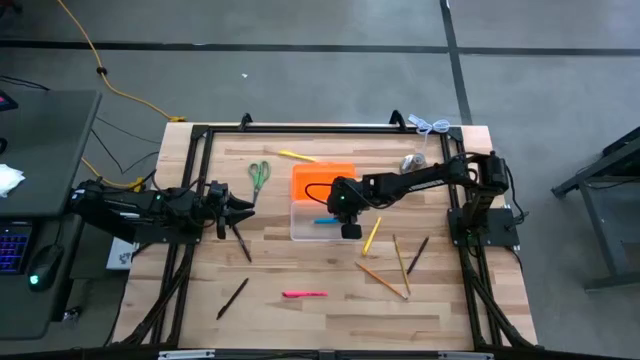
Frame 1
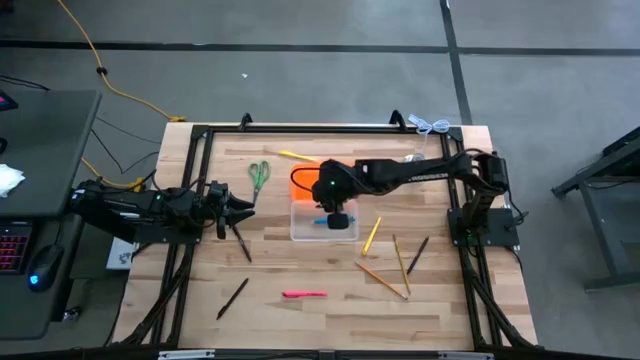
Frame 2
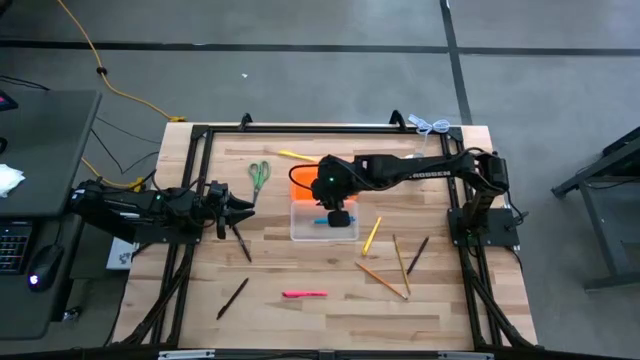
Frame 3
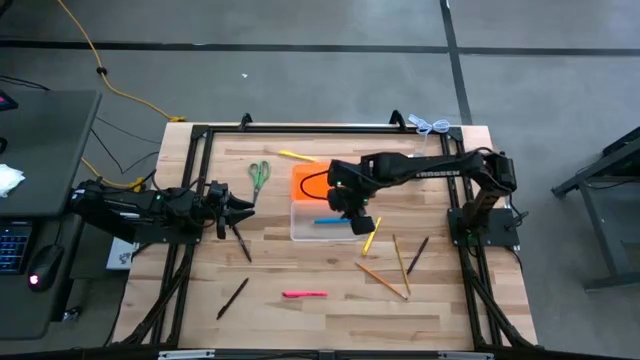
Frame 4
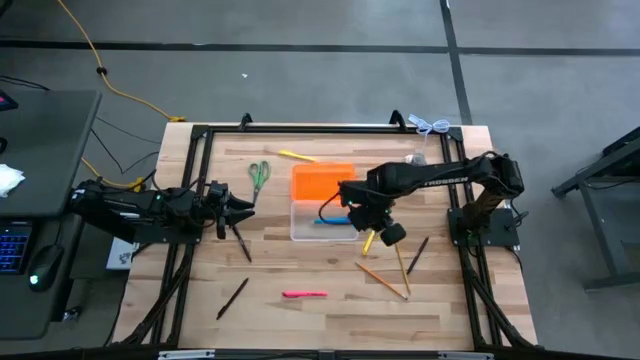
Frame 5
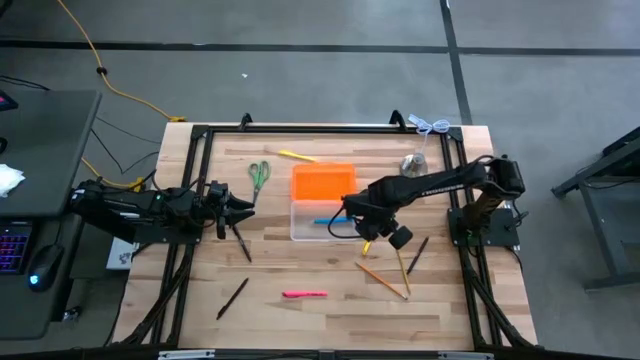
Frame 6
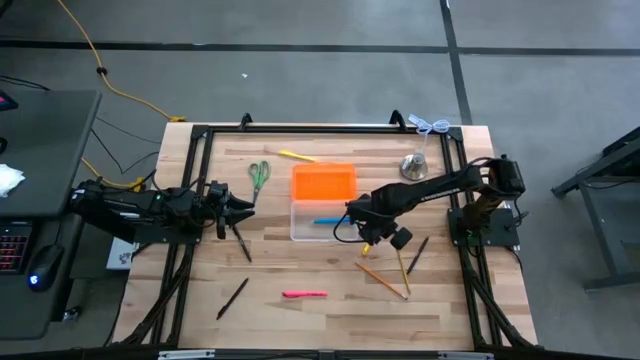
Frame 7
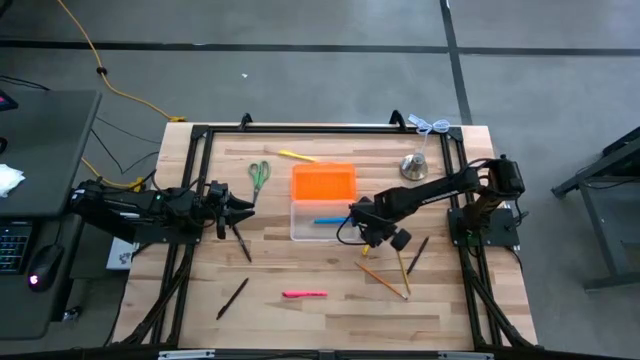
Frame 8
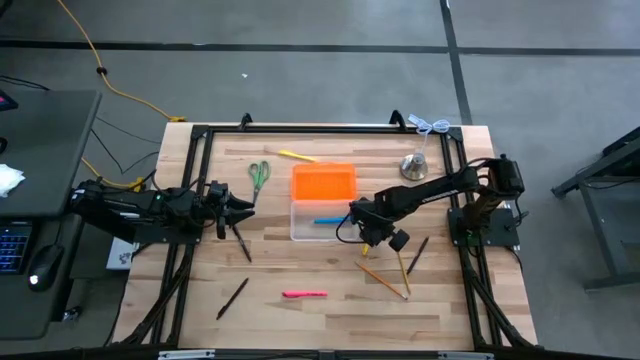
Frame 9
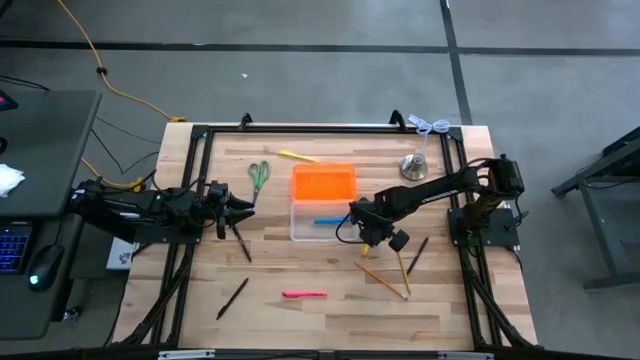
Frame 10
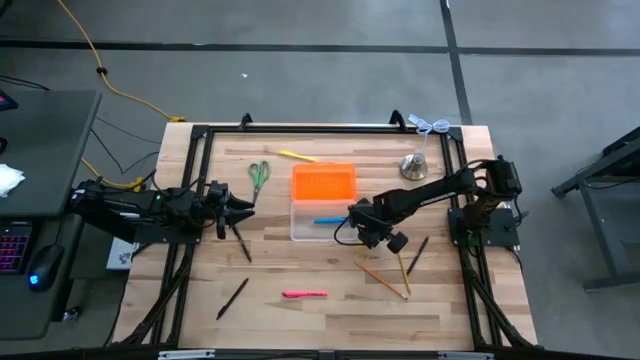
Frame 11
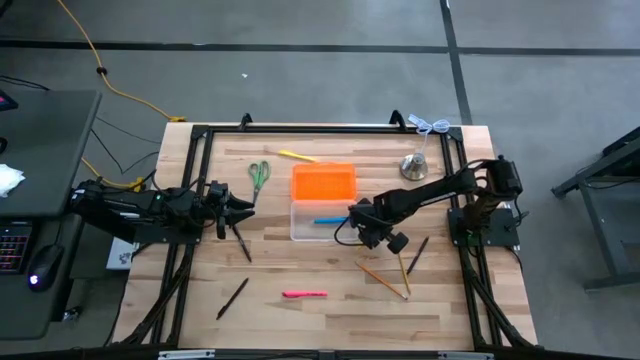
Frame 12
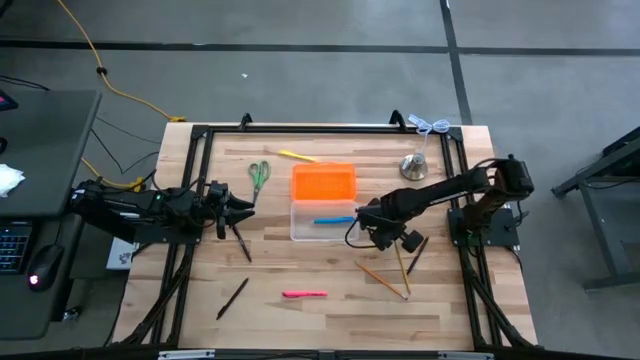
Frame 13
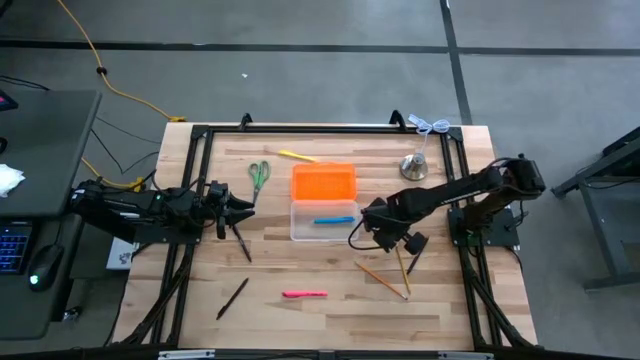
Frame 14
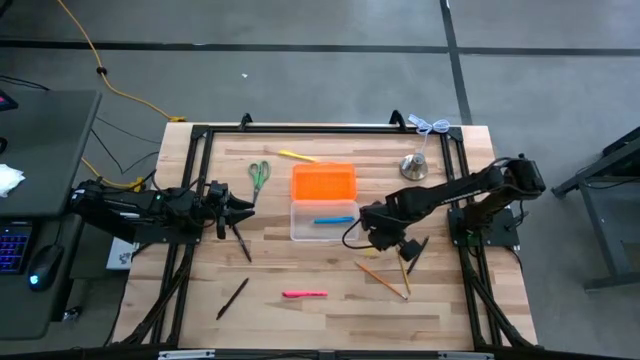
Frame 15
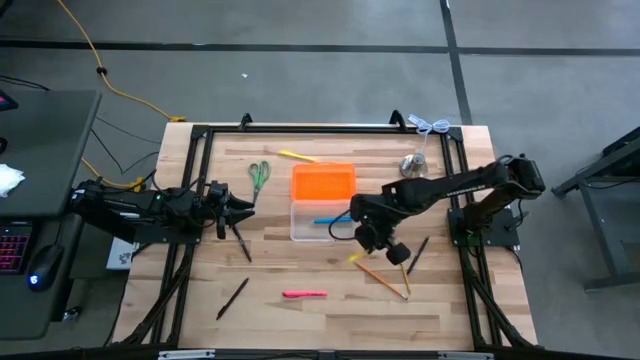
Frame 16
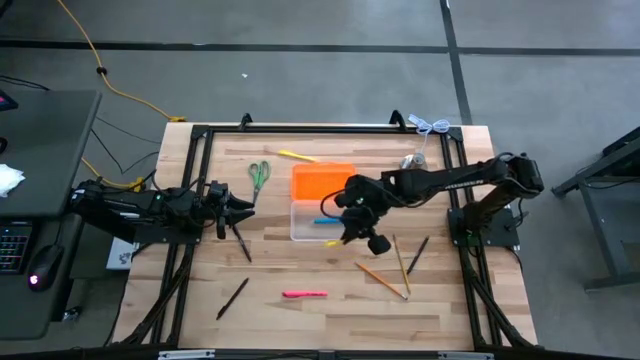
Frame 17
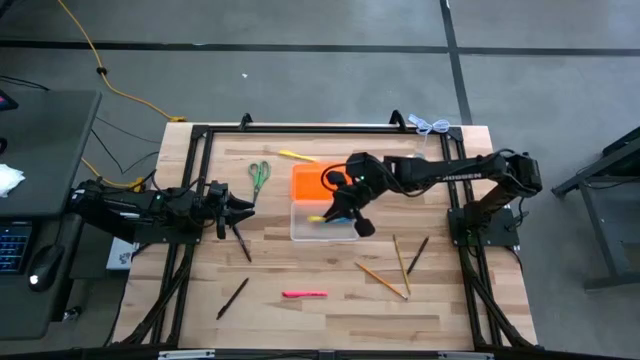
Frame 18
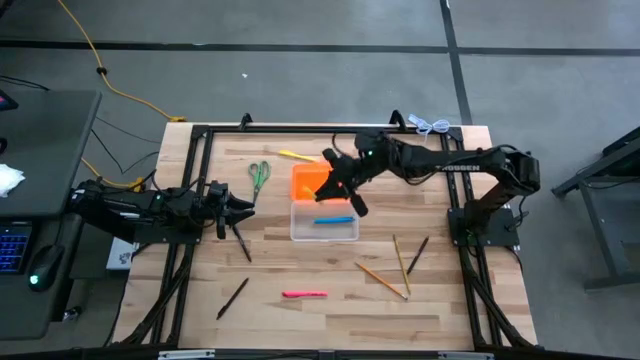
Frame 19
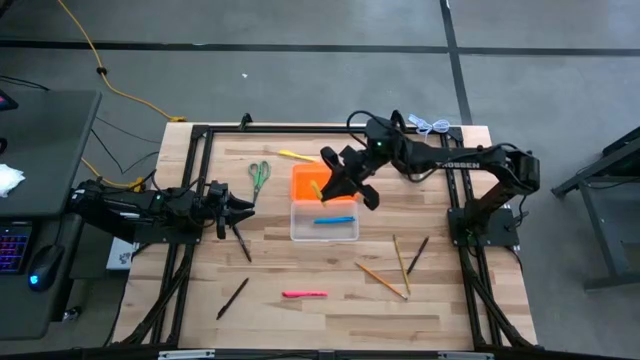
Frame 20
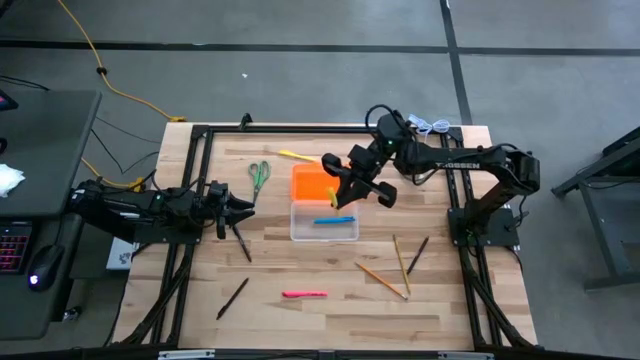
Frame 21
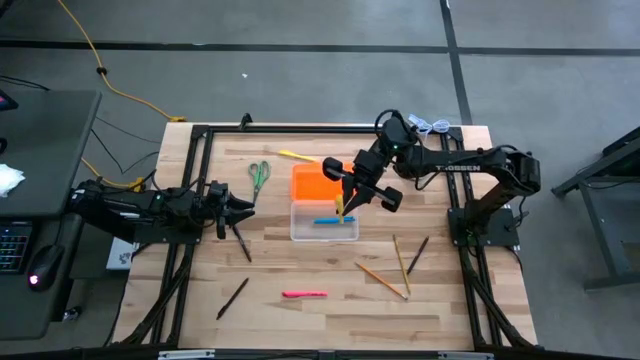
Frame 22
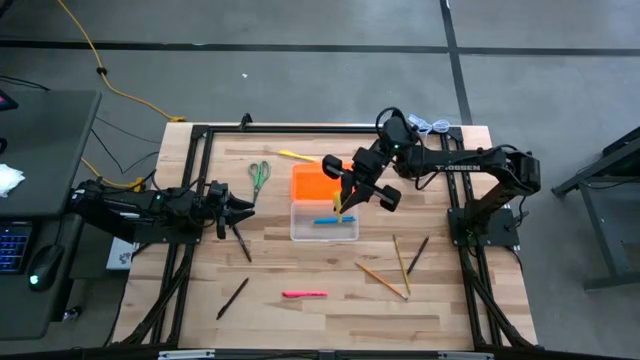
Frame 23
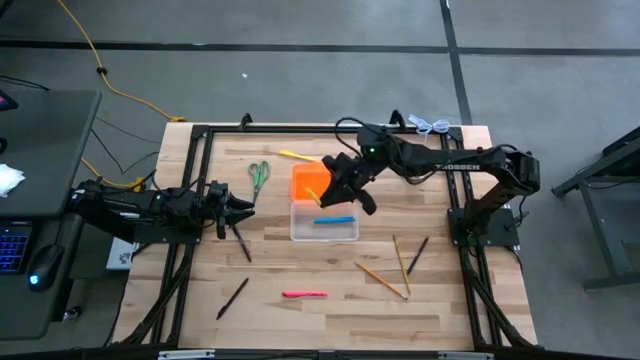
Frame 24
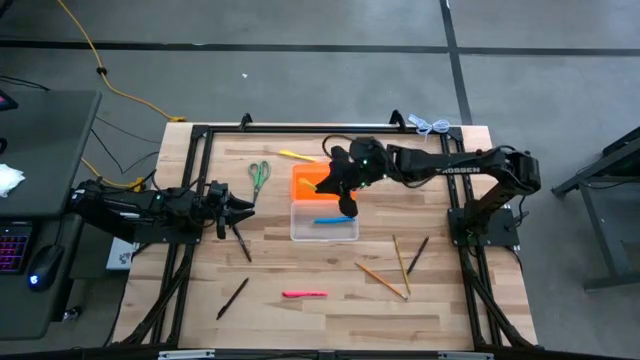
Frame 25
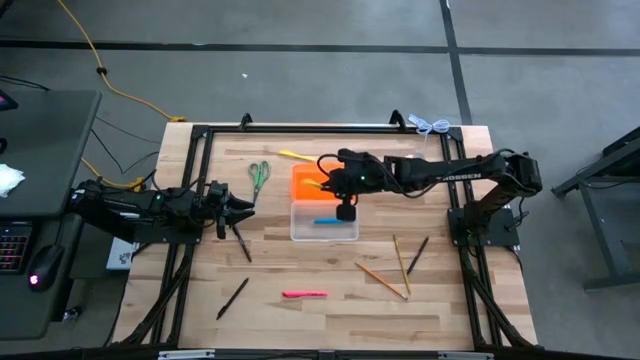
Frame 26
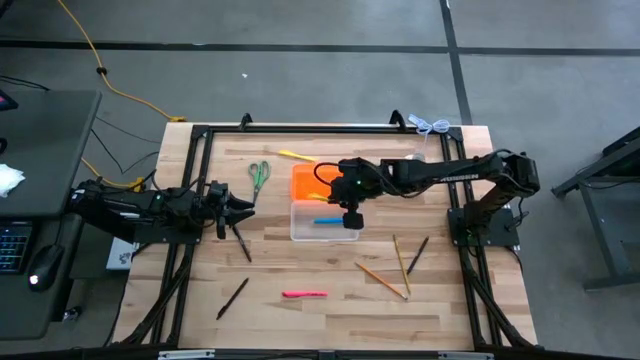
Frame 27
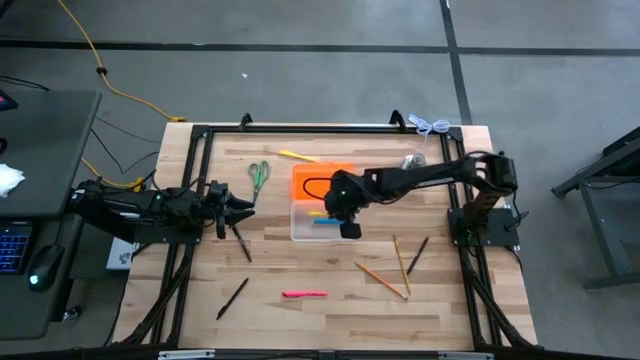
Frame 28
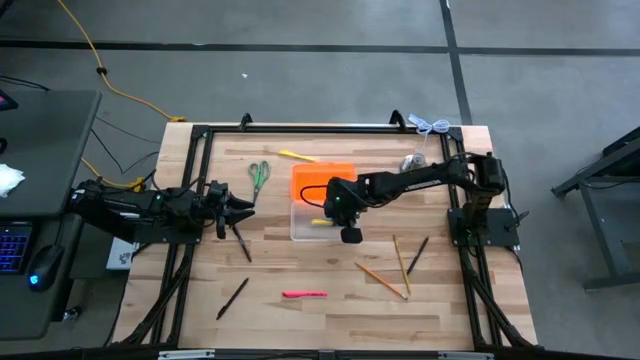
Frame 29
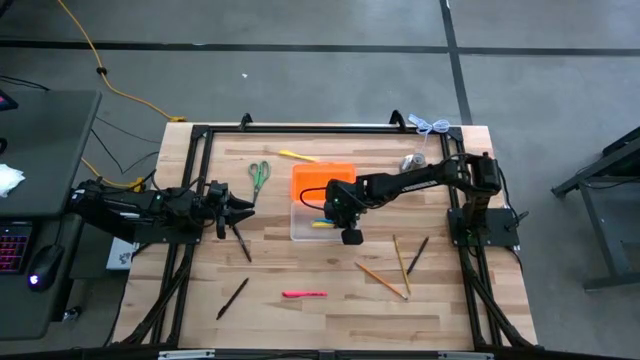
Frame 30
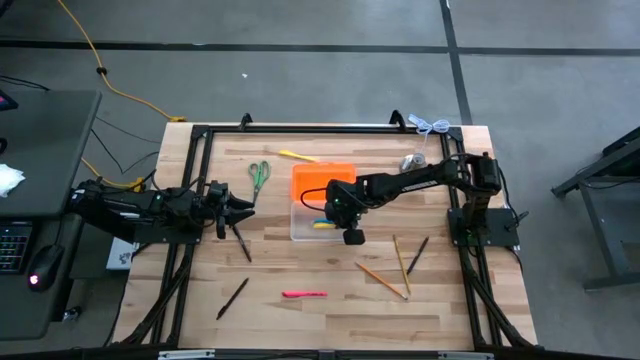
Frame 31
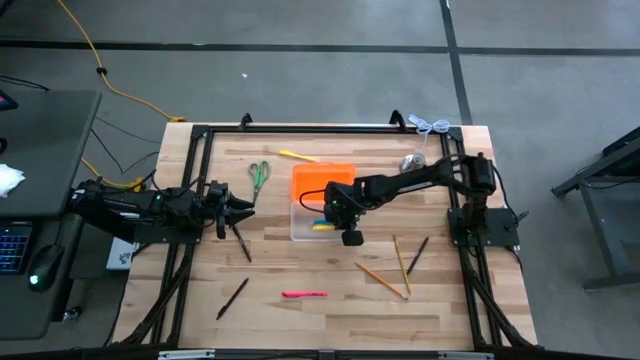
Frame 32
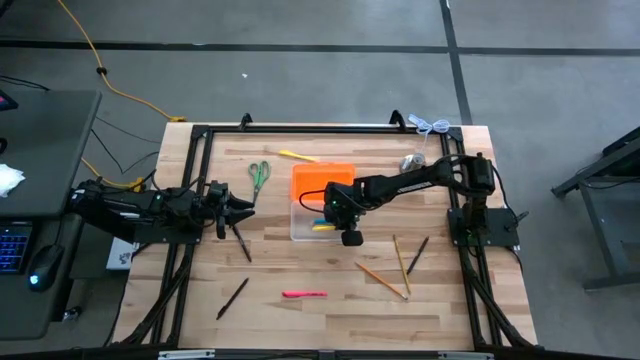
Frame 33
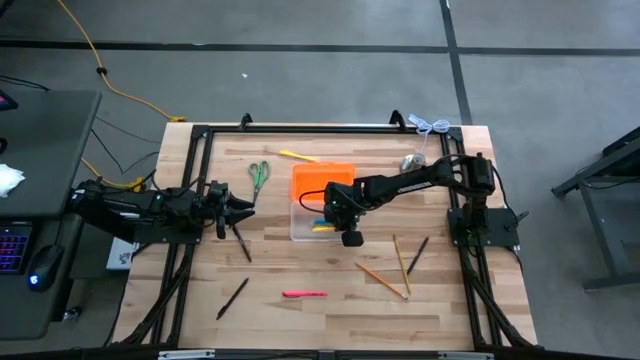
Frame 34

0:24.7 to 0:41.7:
Task: Pick & place school supplies into a supply box
Put the bottom yellow pen into the orange supply box

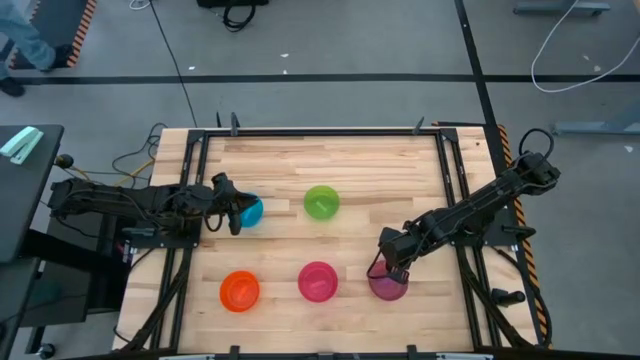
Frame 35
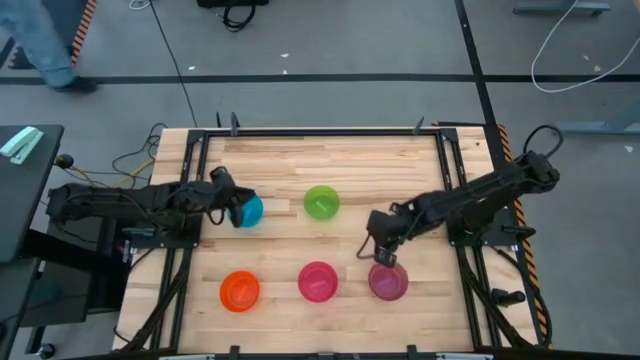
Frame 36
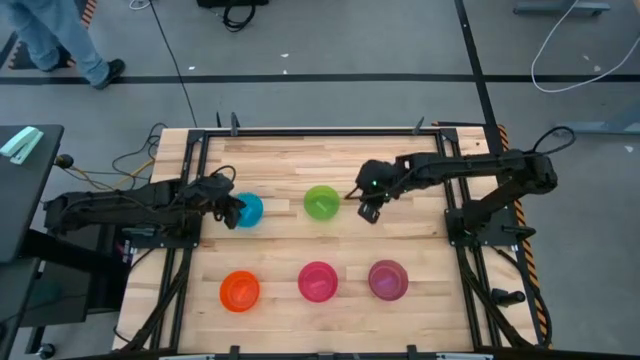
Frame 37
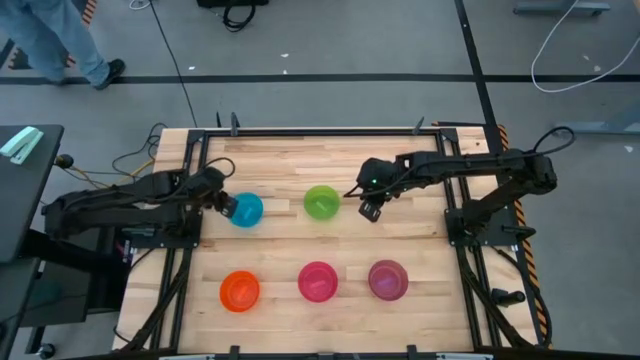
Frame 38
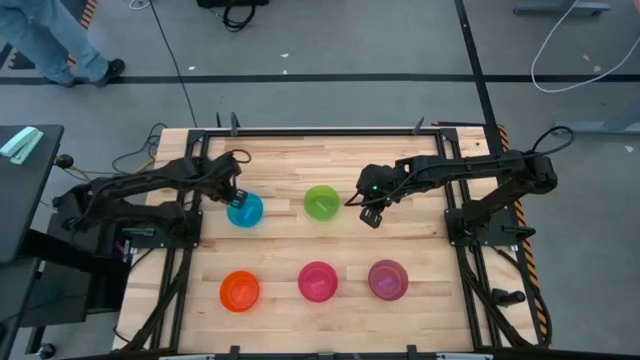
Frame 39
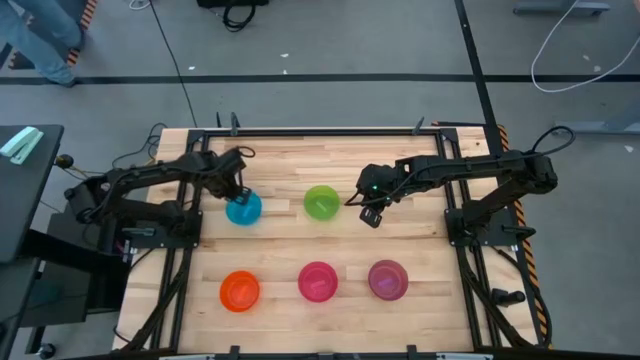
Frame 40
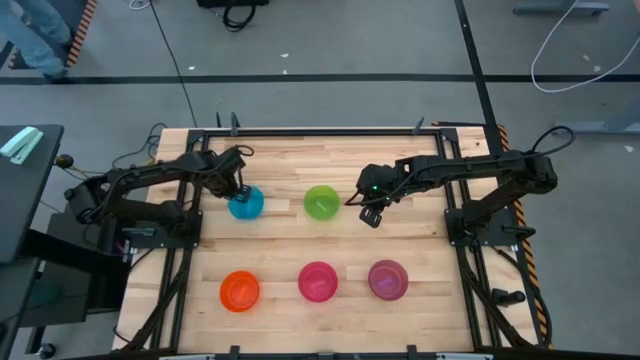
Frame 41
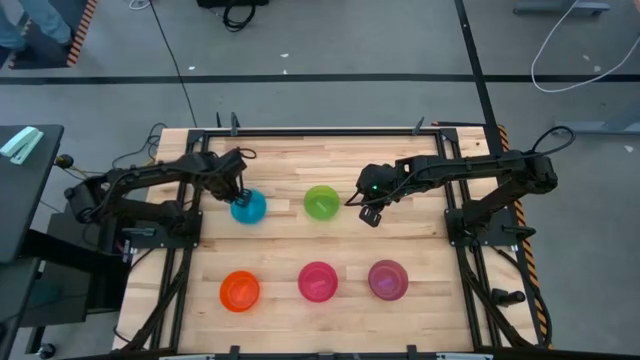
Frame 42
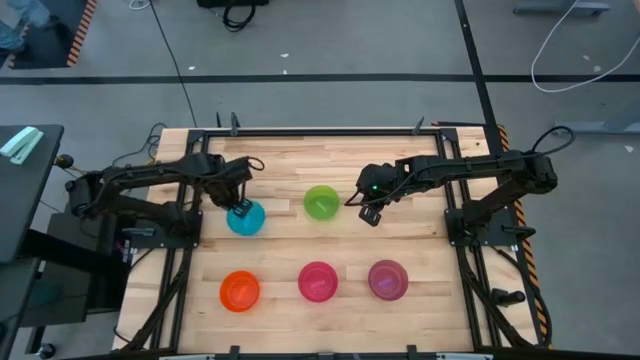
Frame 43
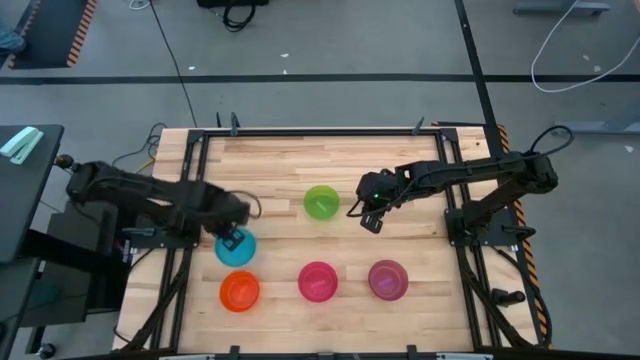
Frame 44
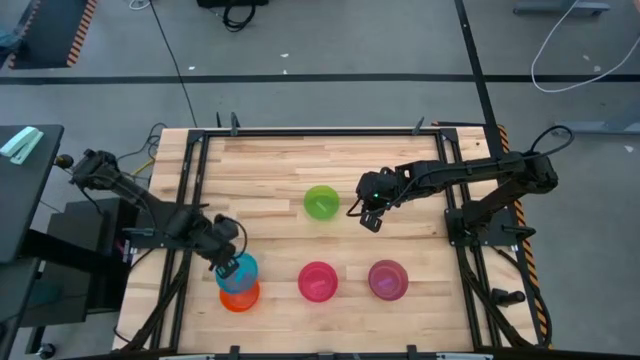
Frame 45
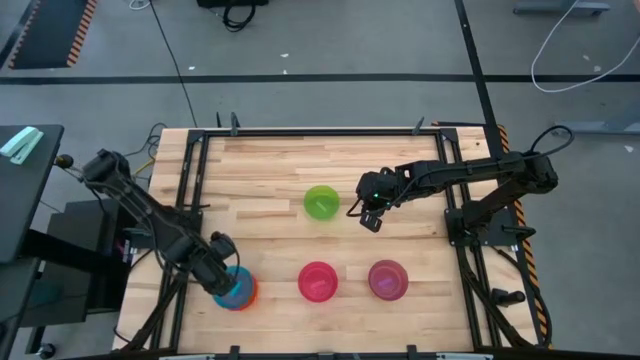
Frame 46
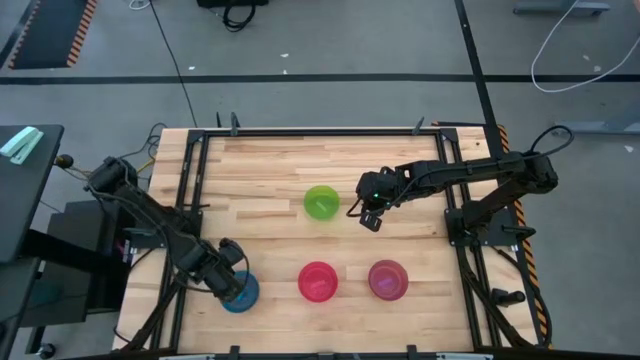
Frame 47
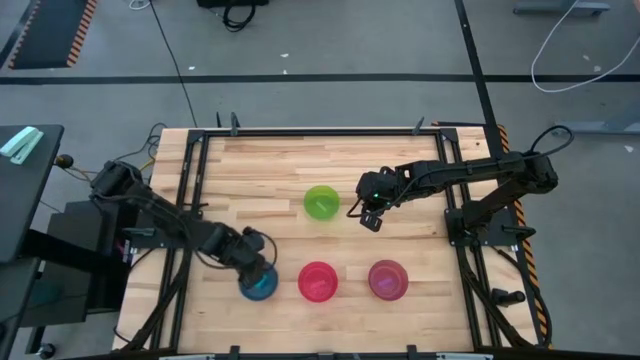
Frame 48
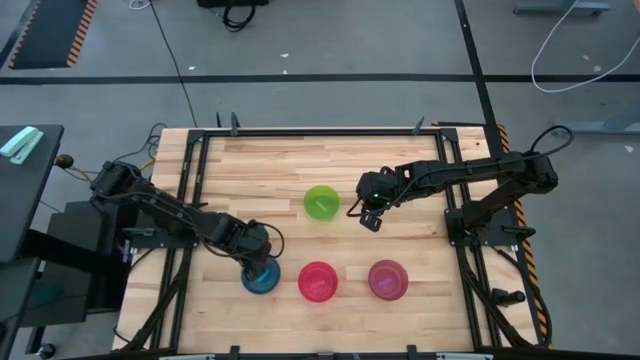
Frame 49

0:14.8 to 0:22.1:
Task: Nest bowls inside each other
Stack the blue bowl on the orange bowl
